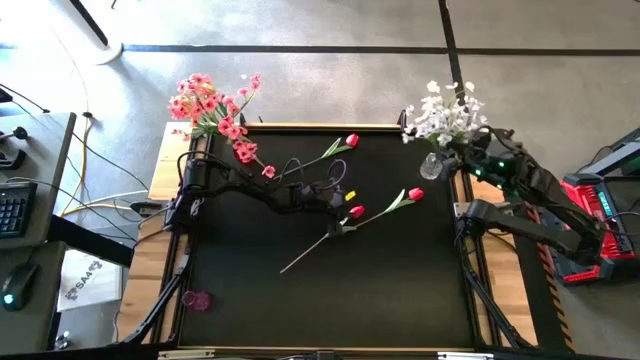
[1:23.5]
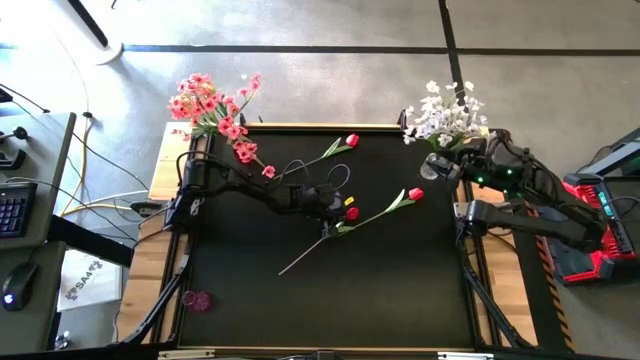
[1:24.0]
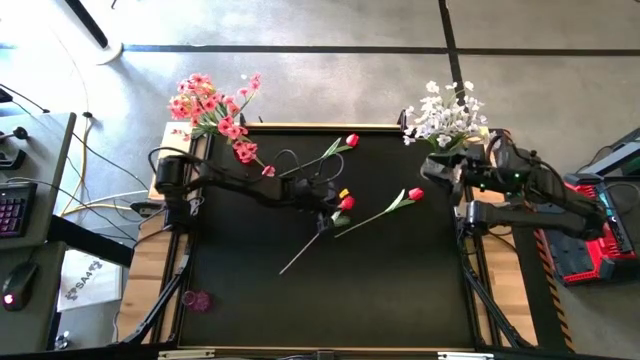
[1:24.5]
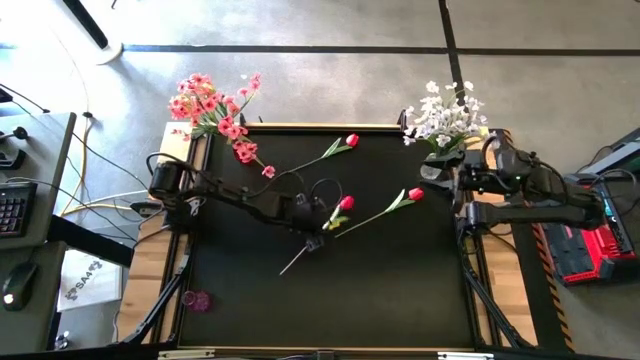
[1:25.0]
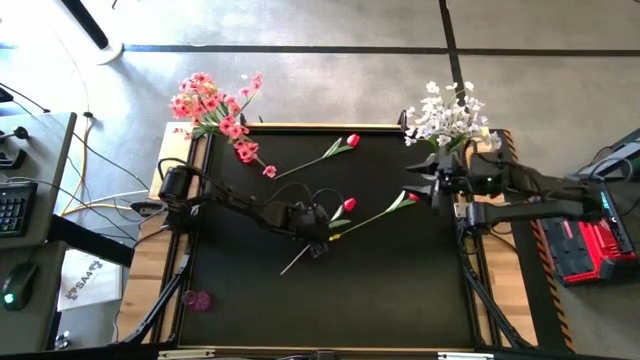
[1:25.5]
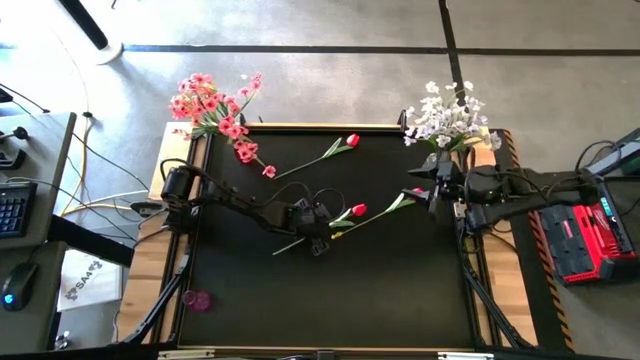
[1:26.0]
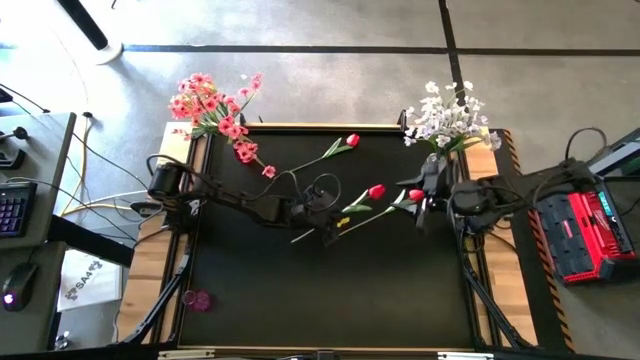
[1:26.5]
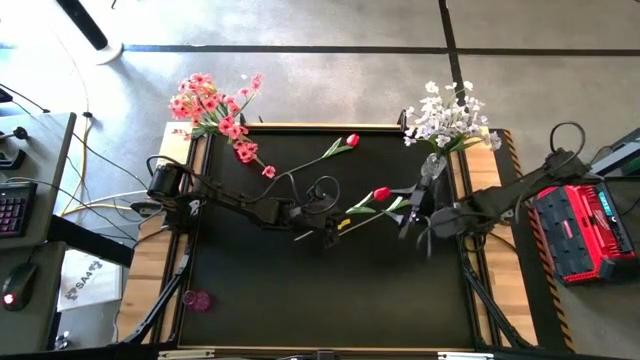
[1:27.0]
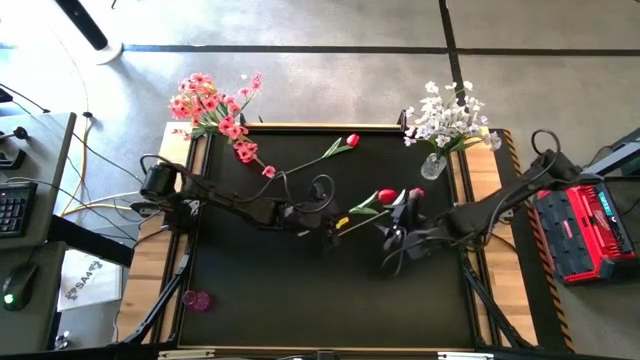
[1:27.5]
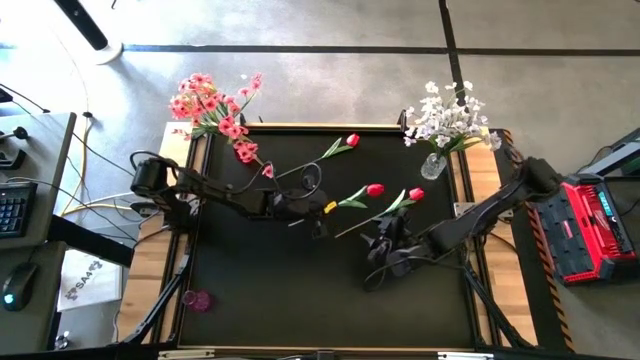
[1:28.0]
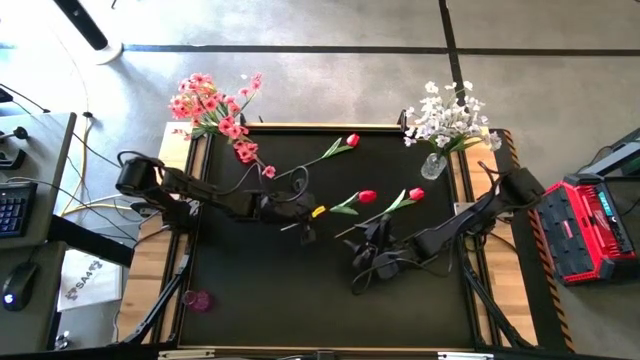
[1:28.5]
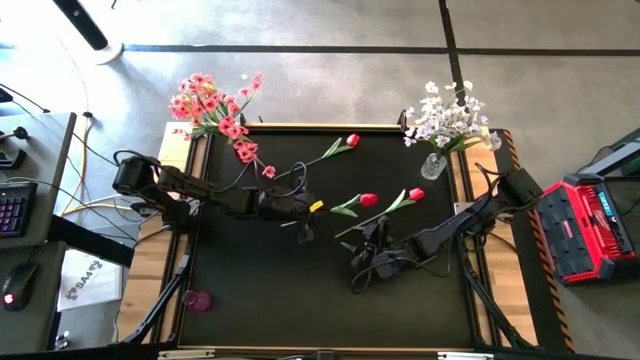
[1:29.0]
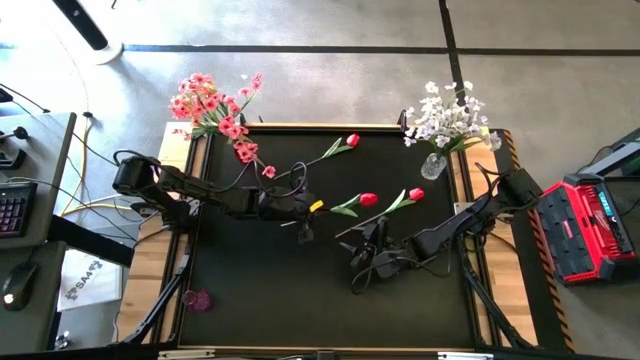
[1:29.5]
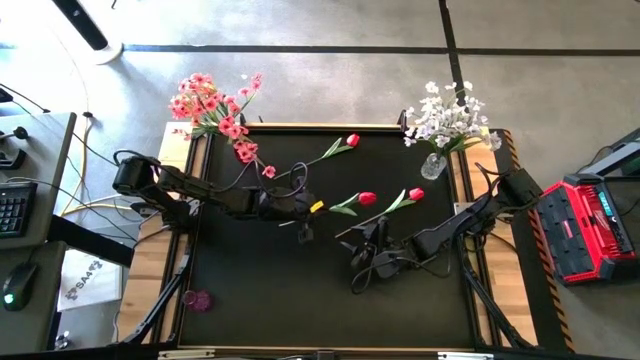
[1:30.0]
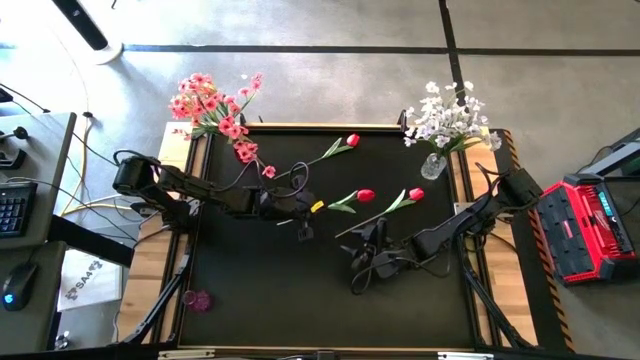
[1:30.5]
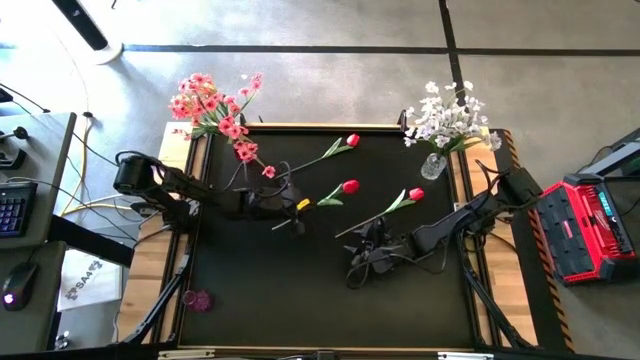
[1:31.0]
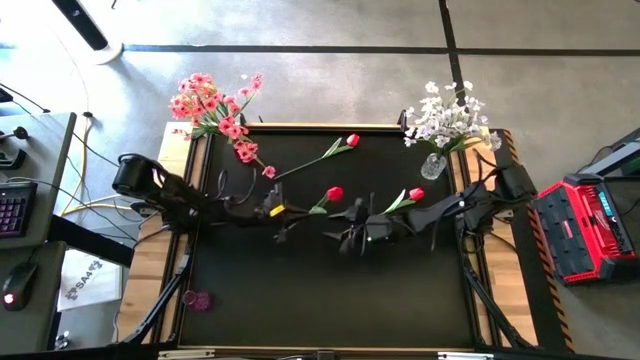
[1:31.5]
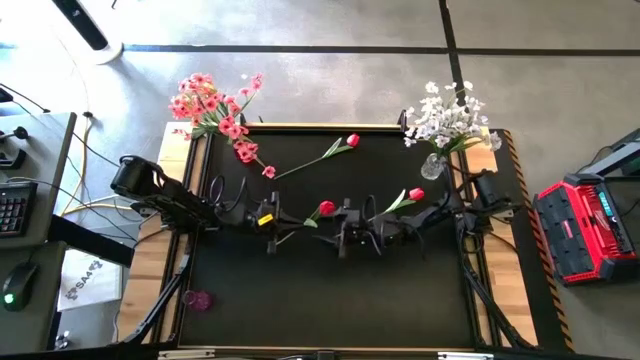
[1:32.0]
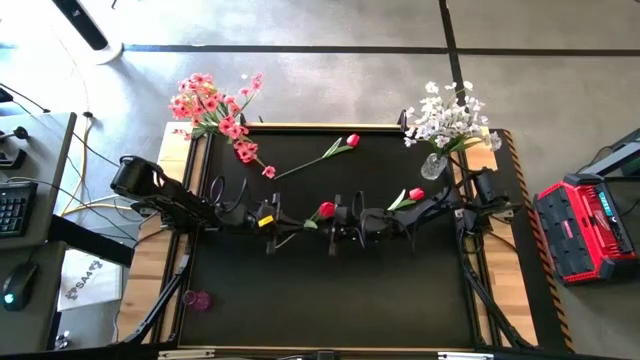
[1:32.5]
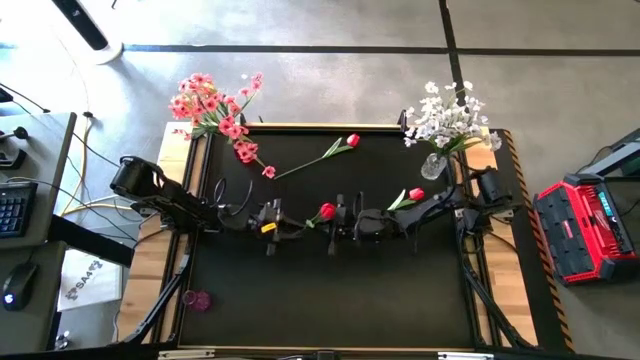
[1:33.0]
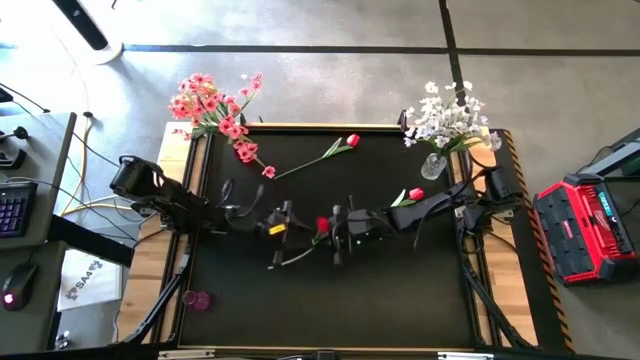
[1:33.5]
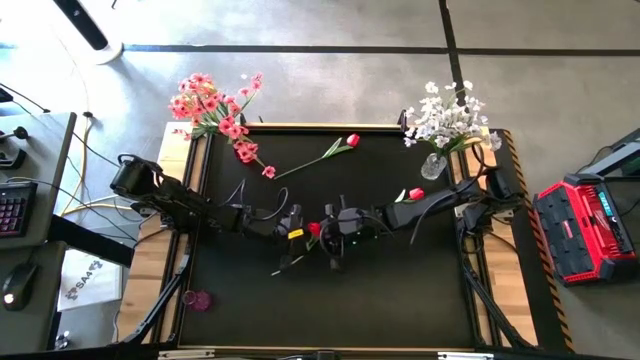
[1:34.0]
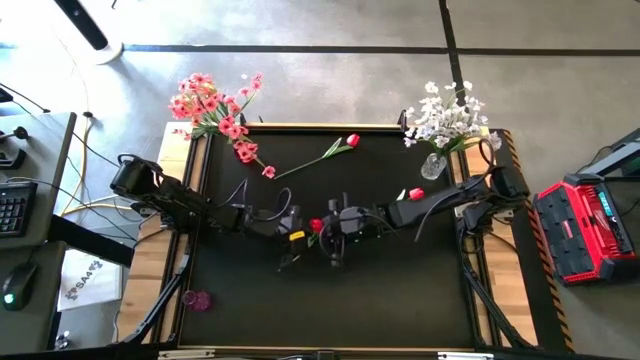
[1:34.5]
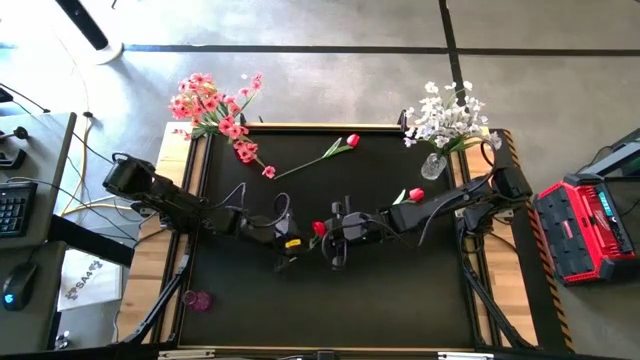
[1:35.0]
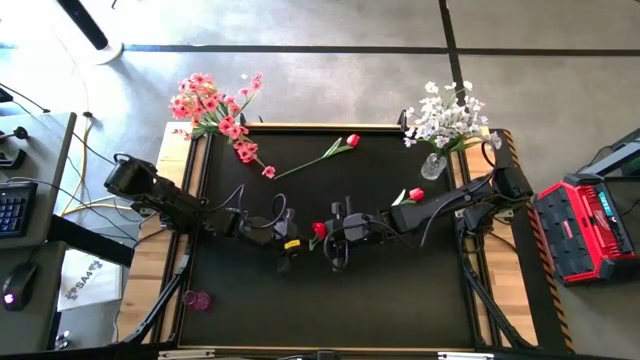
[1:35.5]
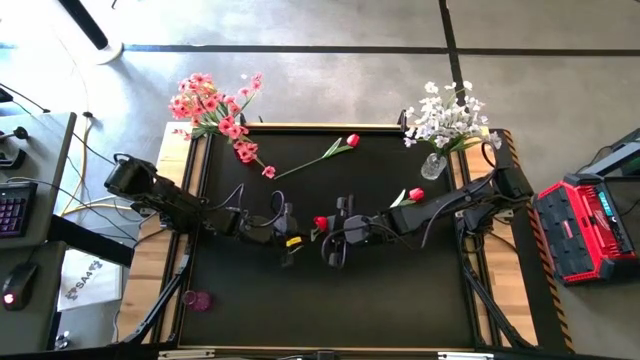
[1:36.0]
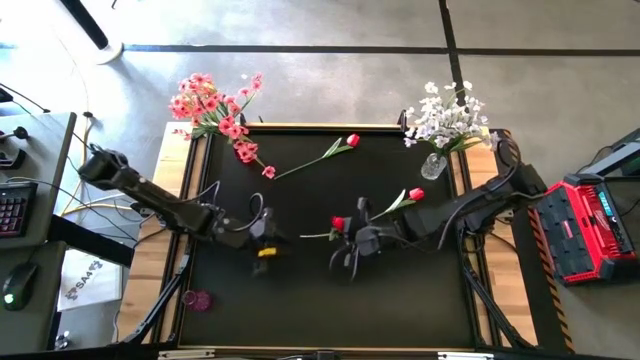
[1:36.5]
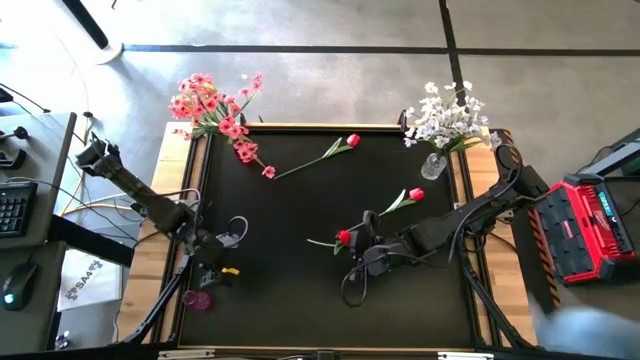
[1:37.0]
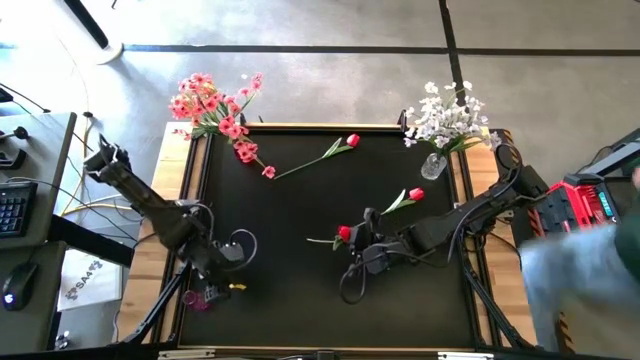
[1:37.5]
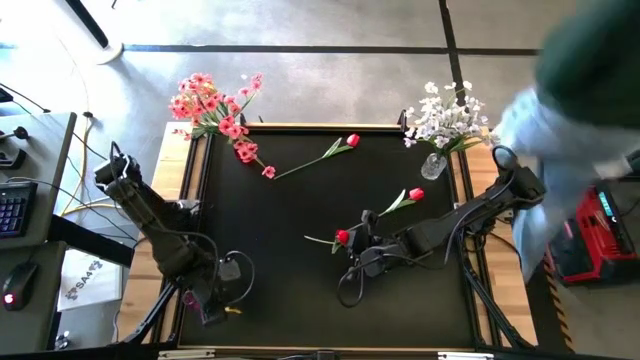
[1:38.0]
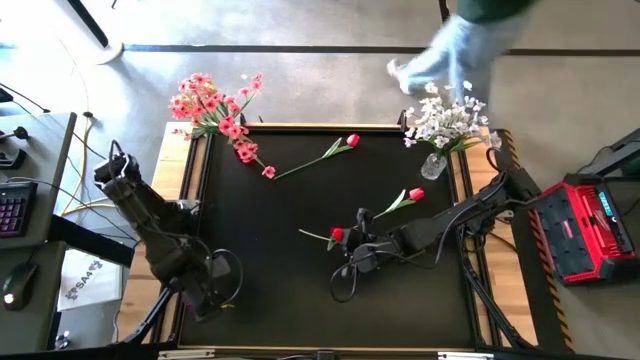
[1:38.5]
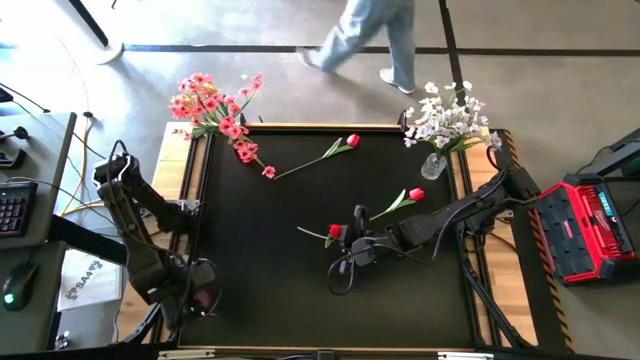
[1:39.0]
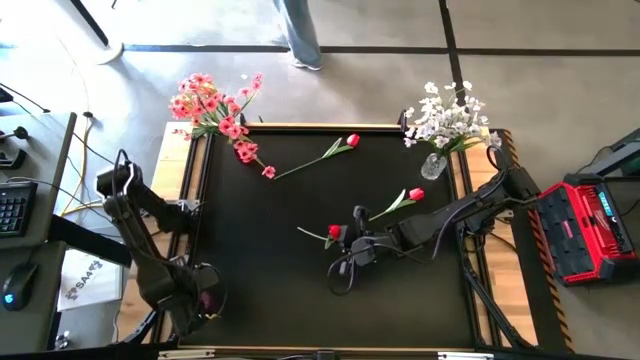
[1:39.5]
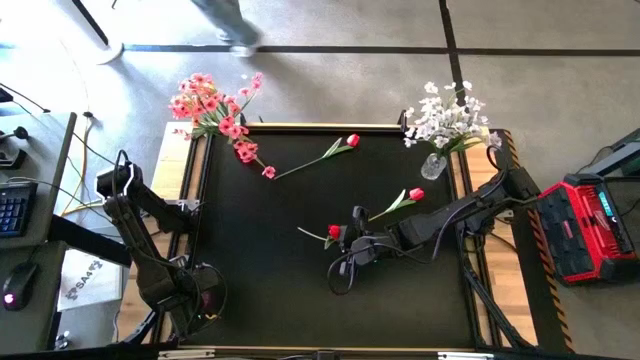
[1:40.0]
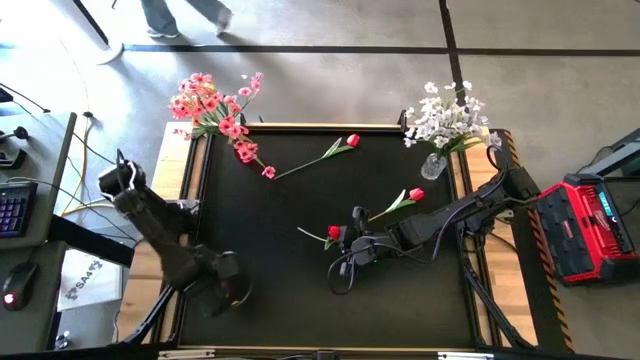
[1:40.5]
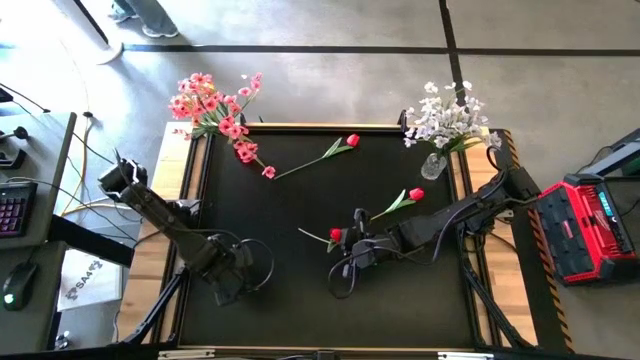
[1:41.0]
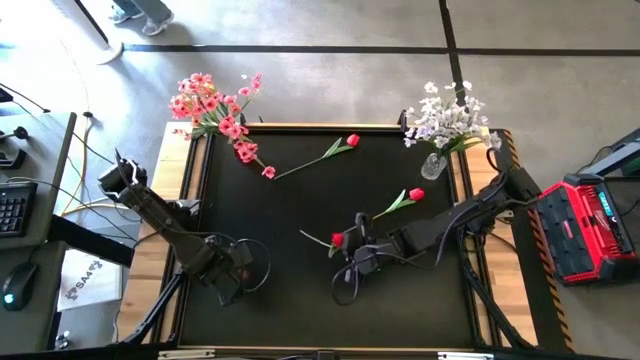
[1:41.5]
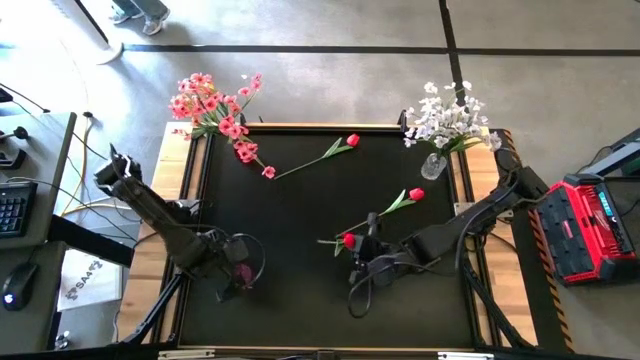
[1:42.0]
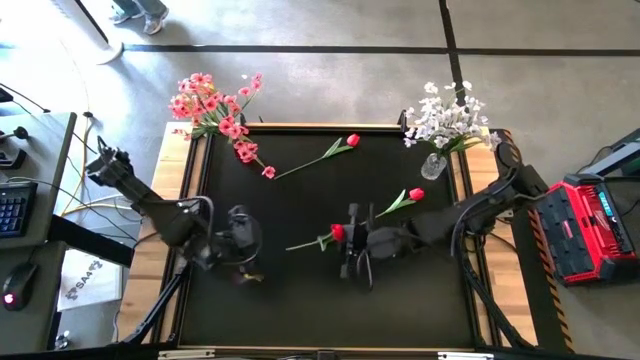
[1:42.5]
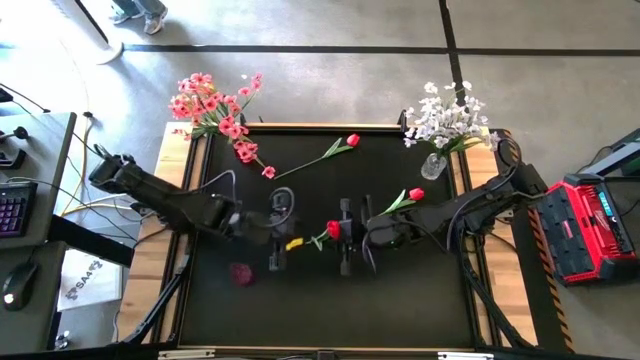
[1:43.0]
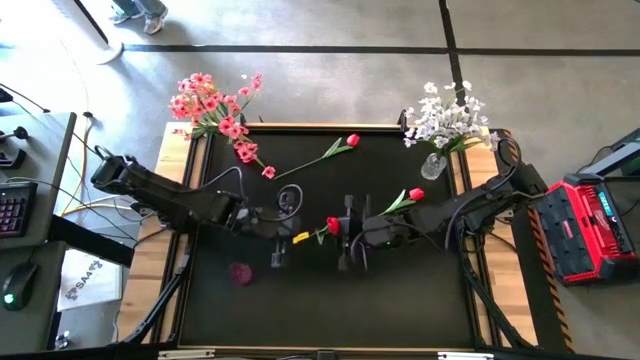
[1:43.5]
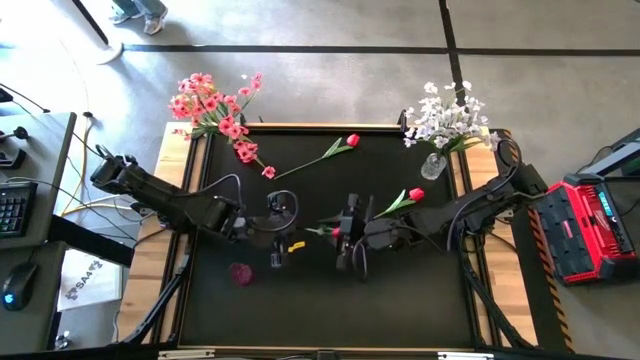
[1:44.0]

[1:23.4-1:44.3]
Task: Sort flowers into vase by color
Put the center red flower into the violet vase
